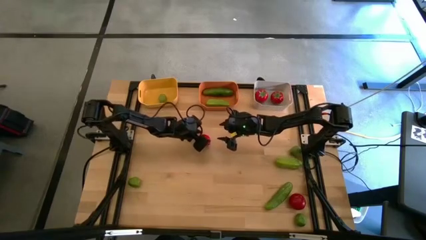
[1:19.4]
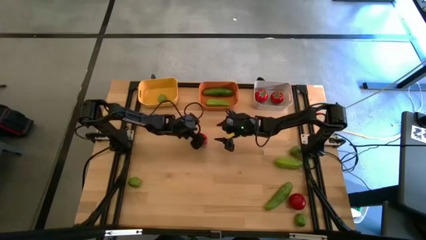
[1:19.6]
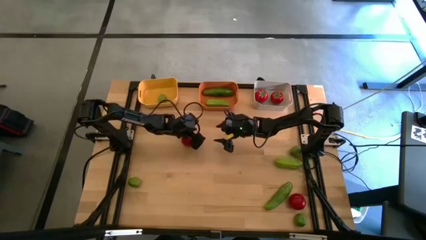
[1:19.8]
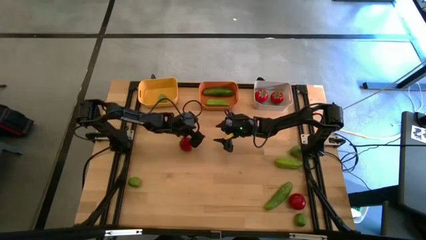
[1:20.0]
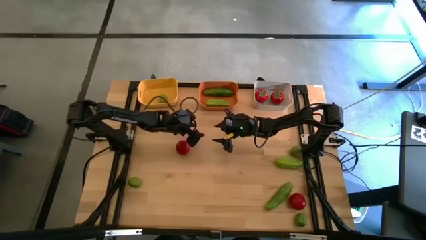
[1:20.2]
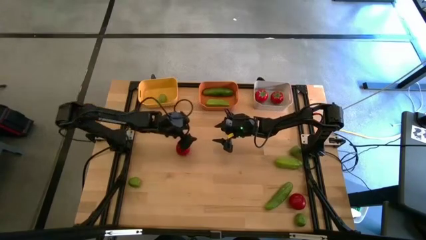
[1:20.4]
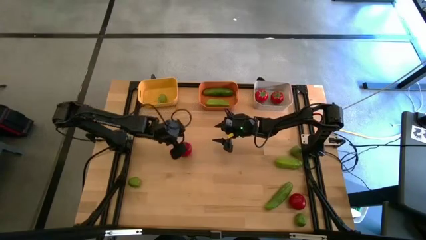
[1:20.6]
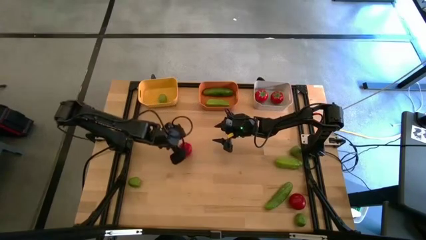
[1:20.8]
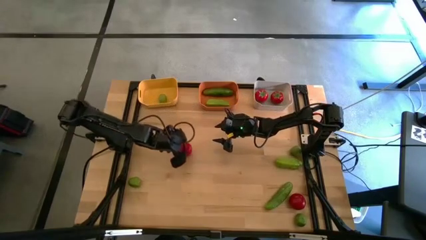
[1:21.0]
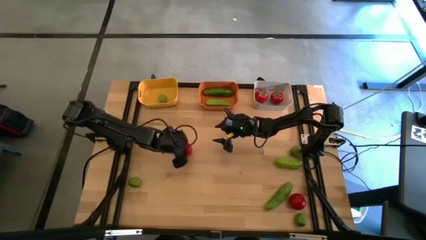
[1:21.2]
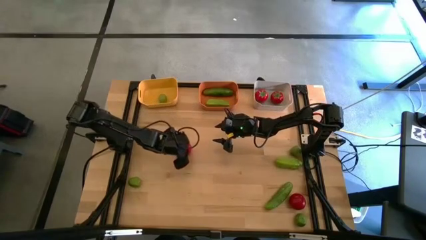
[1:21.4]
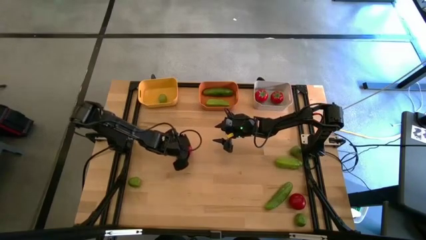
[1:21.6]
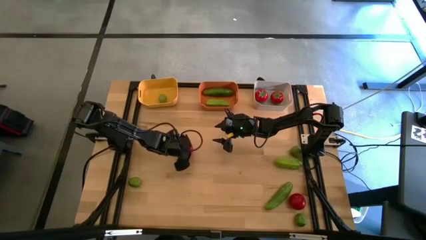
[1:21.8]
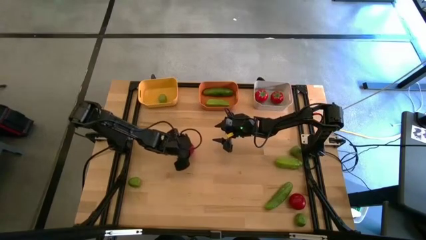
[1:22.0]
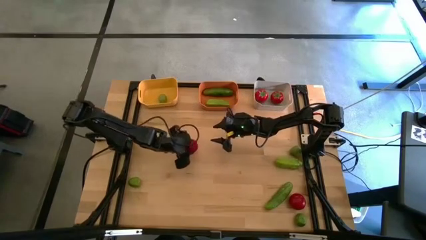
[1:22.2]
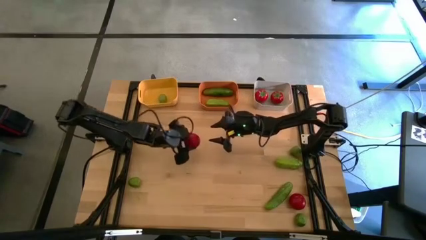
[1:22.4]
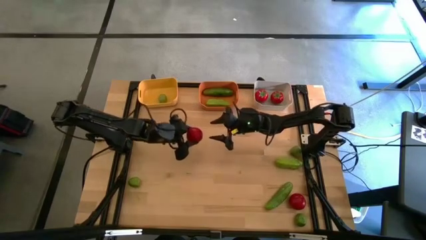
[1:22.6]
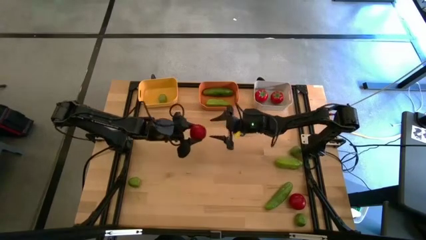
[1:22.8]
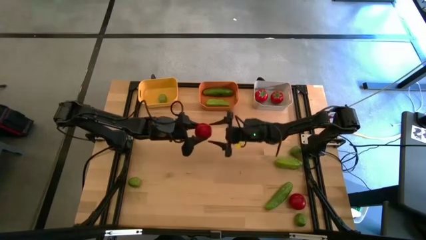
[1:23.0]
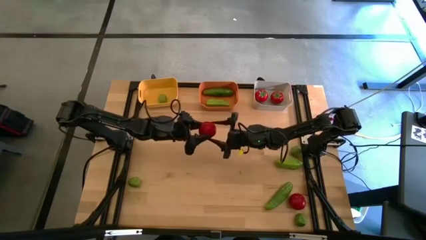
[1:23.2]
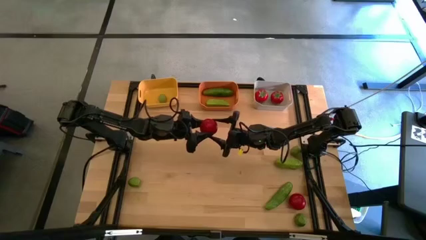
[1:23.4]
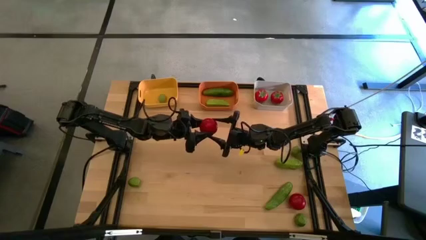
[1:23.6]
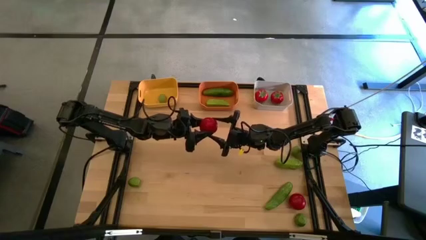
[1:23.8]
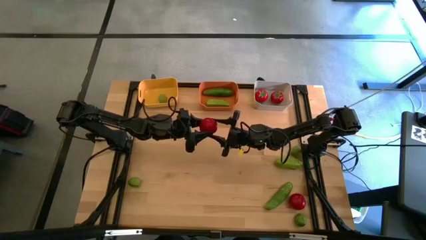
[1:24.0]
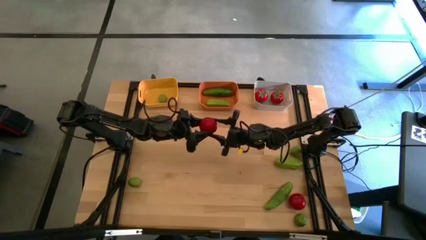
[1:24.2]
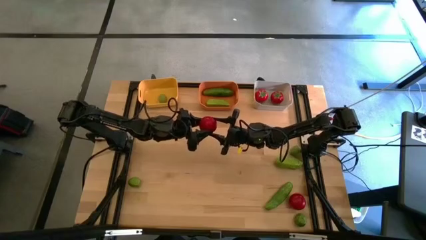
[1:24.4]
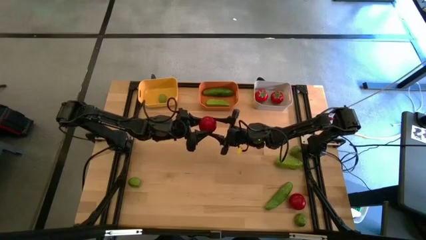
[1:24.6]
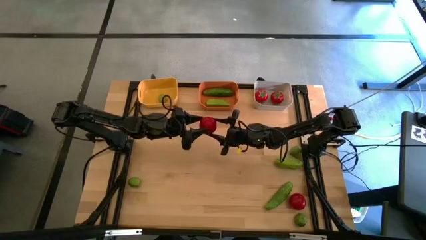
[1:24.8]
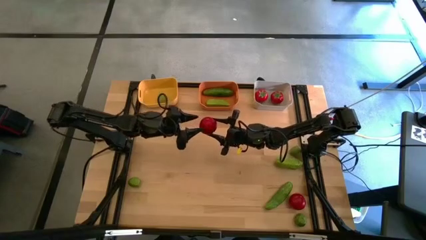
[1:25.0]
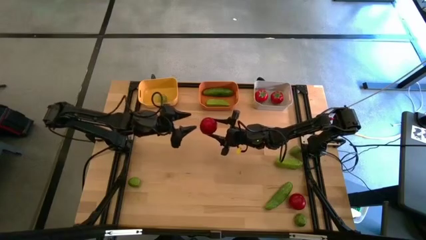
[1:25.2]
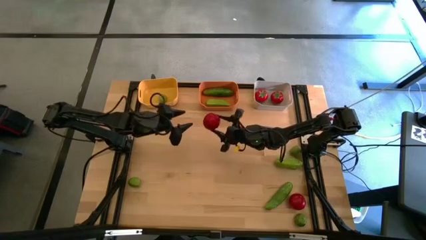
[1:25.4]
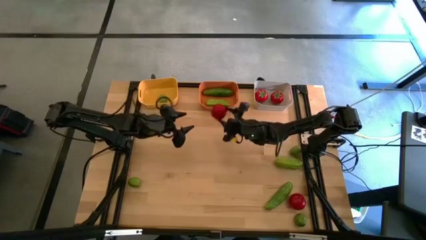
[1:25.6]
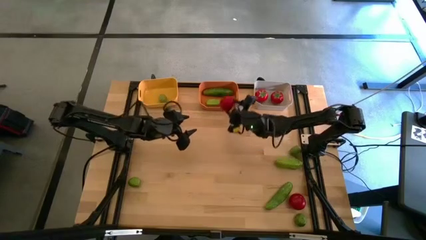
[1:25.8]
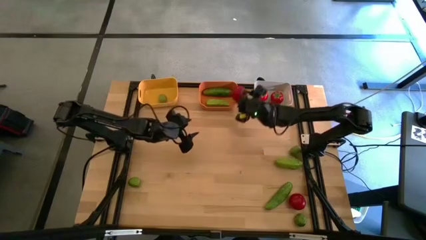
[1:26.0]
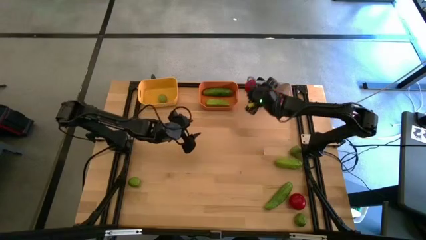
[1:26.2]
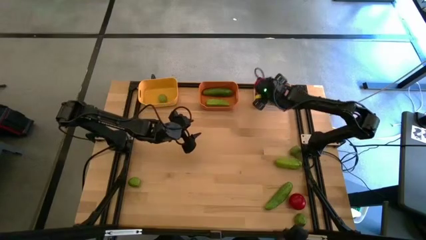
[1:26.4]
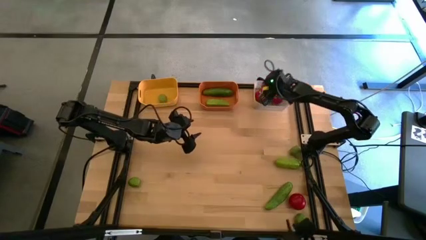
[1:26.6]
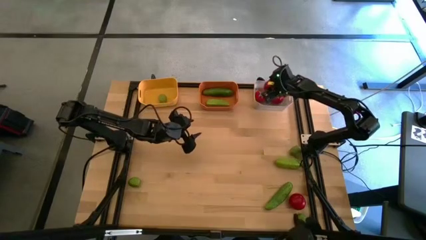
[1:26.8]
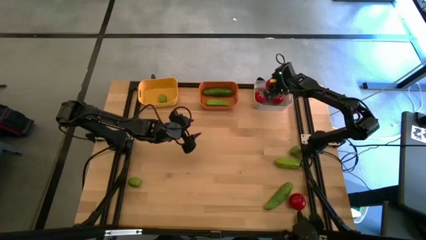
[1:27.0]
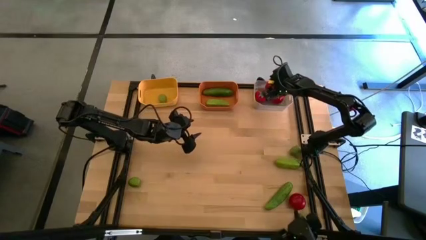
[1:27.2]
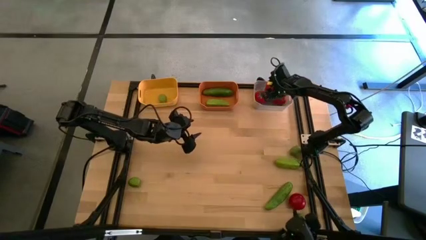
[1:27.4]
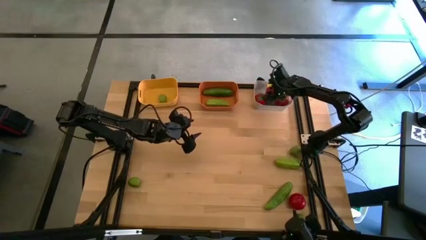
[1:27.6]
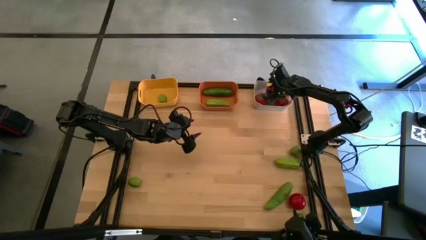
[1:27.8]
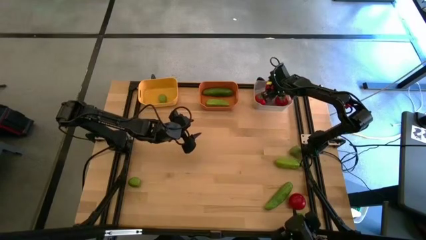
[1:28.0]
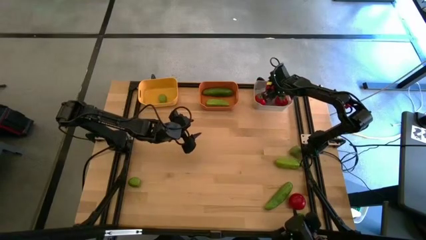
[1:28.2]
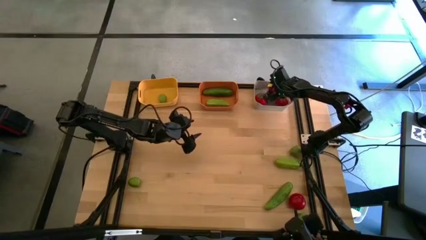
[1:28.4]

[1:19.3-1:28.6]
Task: Sort produce into baskets
Put the tomato into the white bin

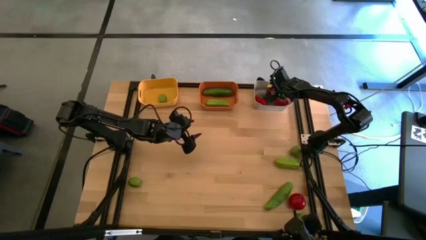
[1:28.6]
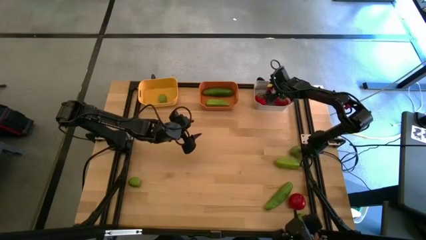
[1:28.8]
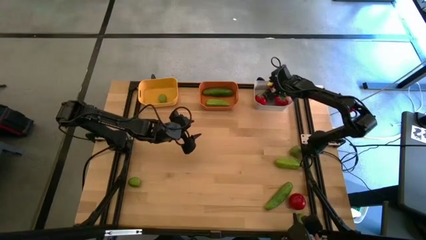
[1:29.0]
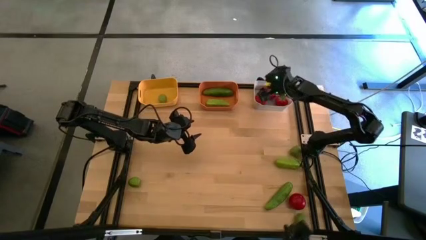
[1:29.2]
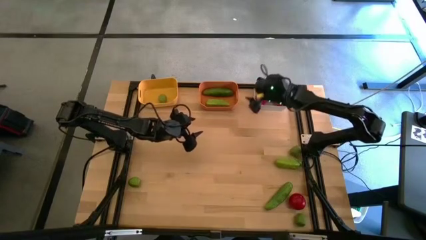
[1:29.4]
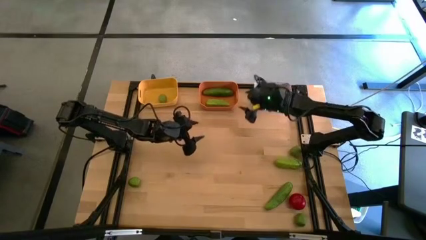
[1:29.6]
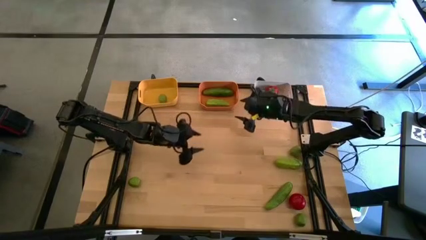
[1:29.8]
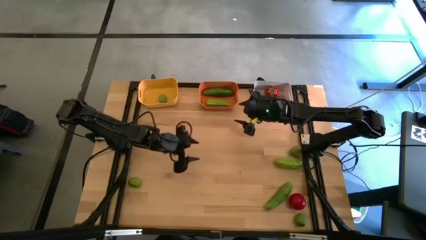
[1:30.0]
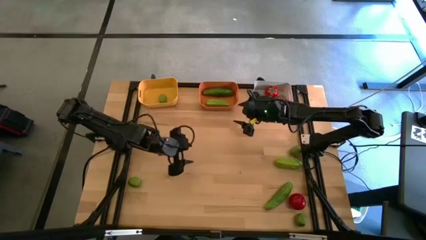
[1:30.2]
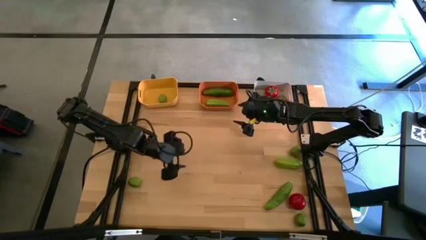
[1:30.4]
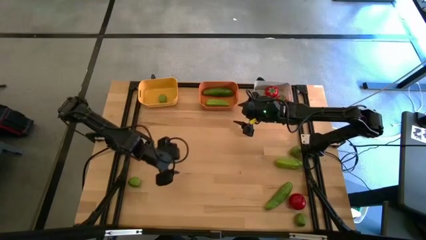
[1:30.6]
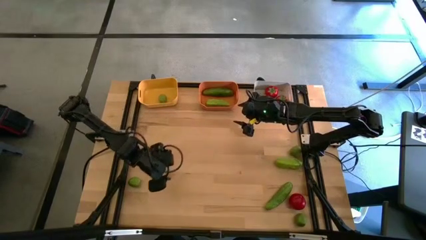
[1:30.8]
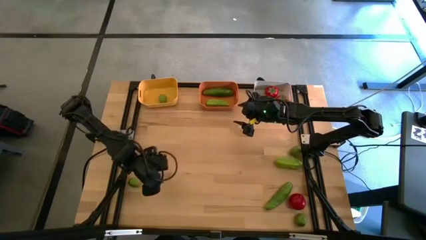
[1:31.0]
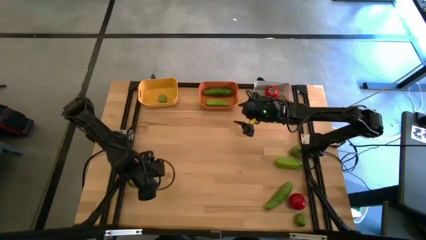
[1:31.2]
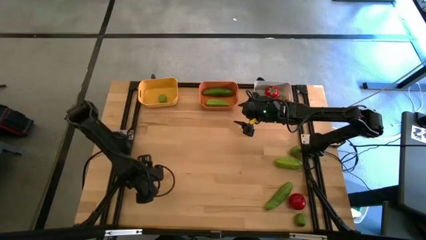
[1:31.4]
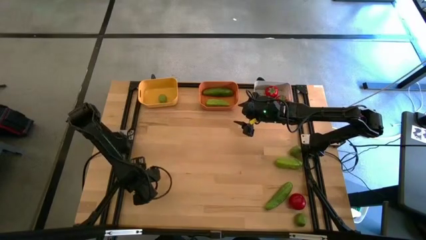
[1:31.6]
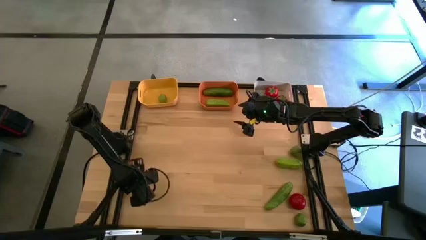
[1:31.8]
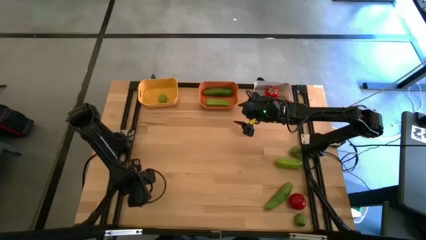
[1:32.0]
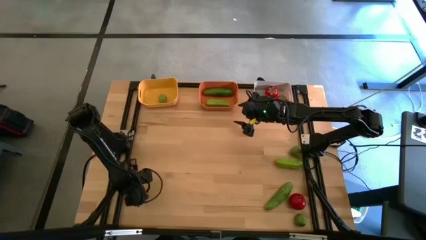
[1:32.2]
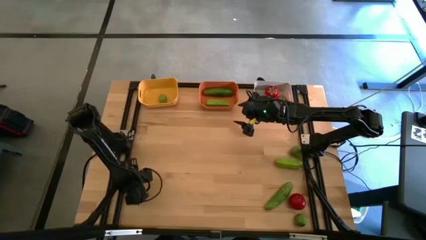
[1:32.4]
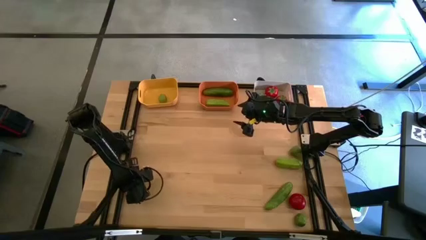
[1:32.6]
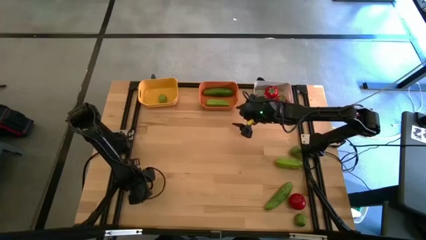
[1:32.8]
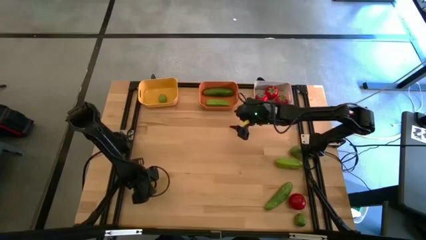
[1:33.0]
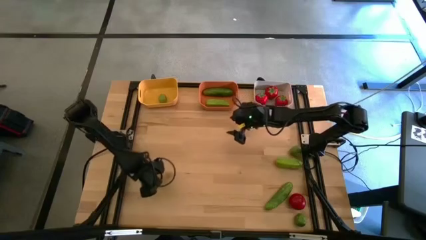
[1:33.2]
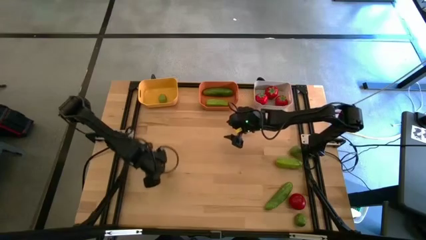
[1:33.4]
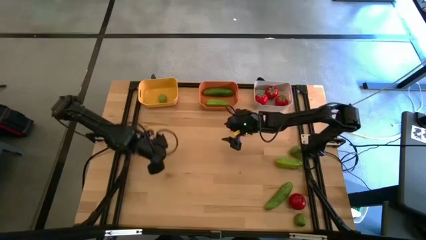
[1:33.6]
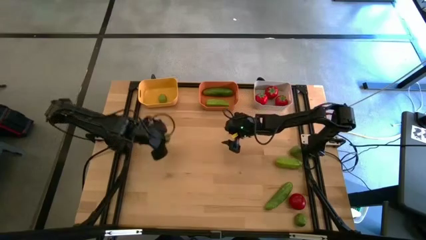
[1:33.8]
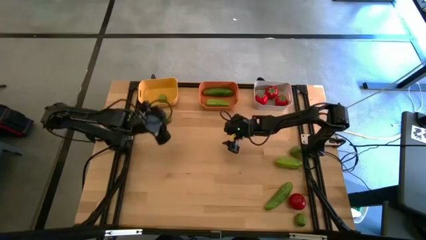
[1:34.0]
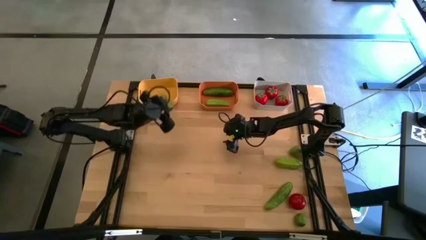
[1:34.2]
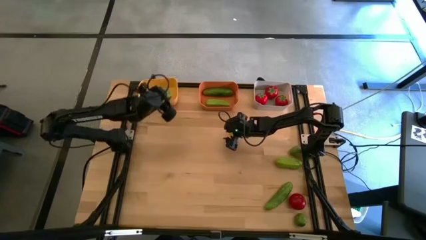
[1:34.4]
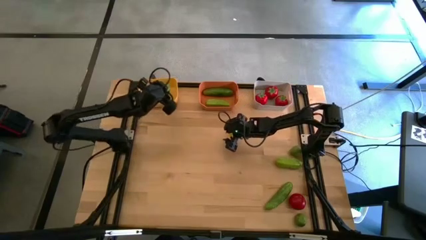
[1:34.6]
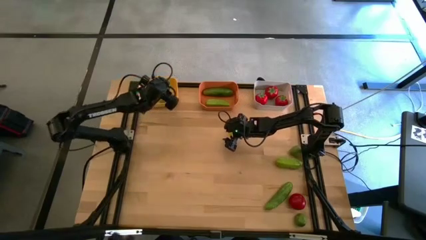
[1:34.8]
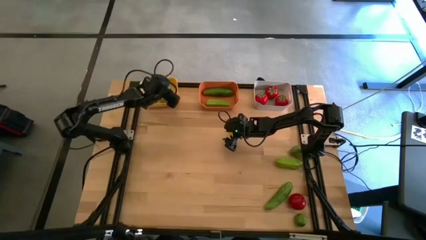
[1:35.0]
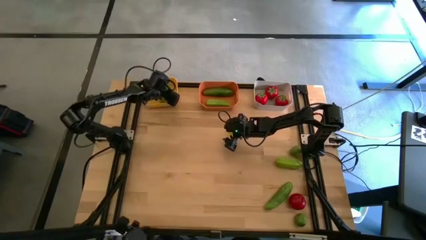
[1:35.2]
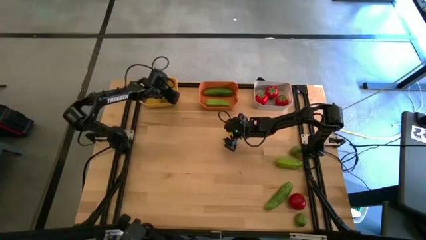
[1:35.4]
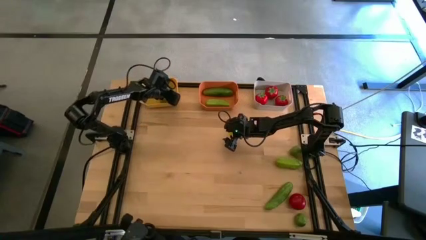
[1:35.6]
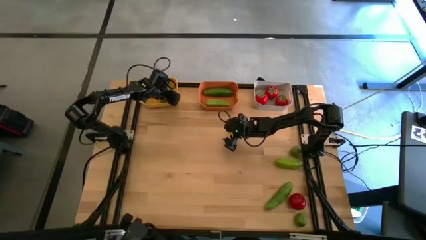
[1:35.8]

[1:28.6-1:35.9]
Put the lime into the yellow bin
